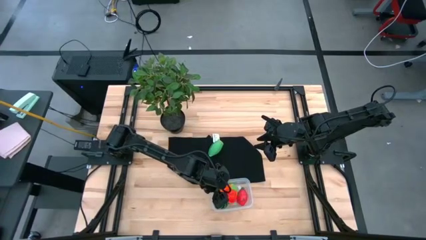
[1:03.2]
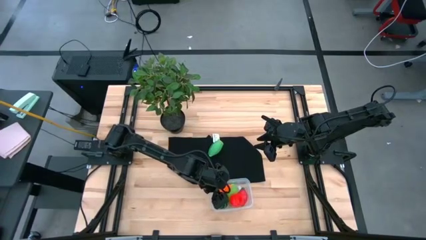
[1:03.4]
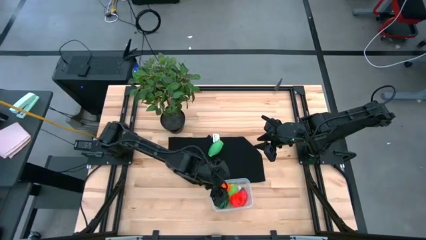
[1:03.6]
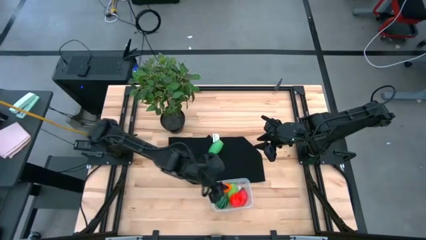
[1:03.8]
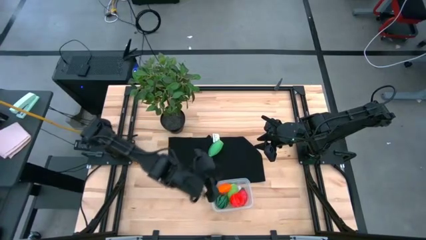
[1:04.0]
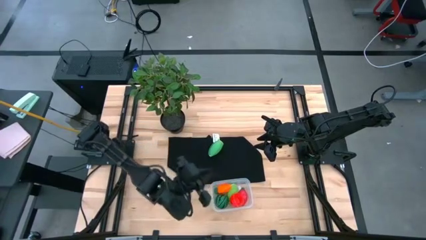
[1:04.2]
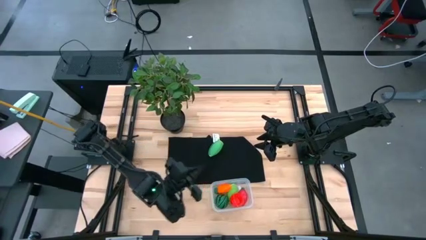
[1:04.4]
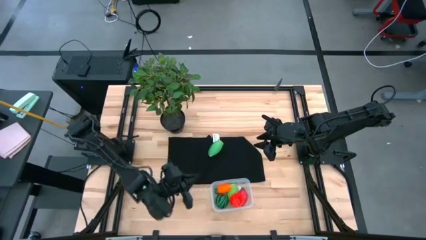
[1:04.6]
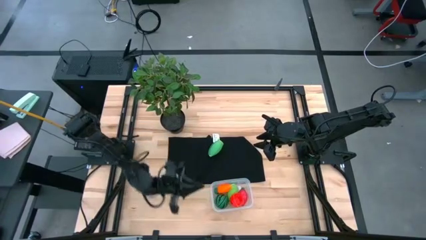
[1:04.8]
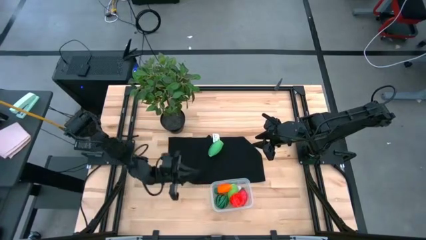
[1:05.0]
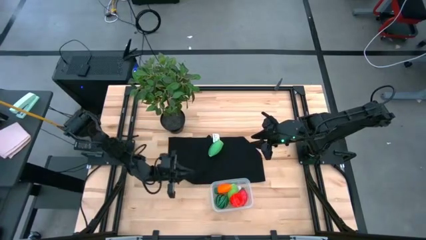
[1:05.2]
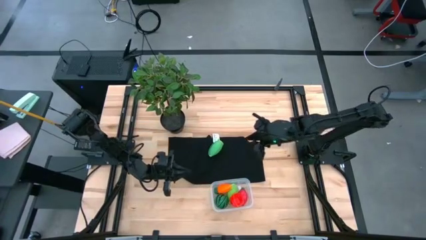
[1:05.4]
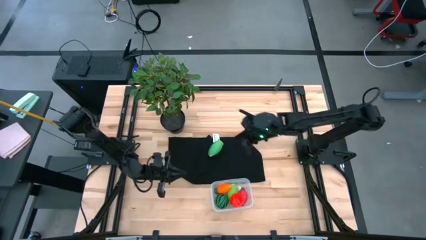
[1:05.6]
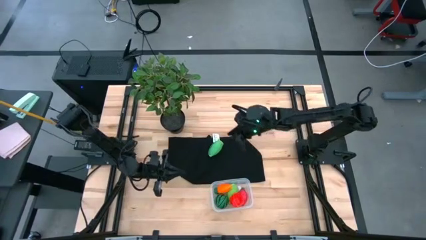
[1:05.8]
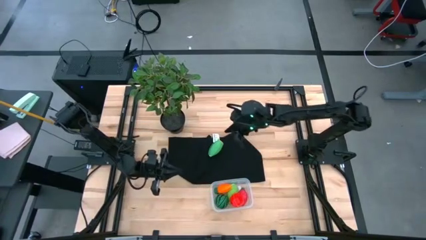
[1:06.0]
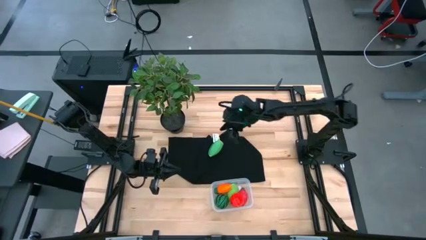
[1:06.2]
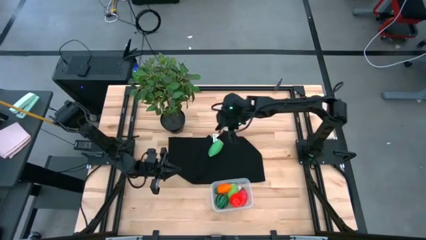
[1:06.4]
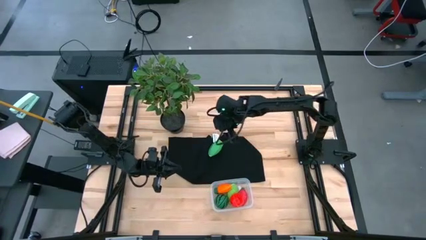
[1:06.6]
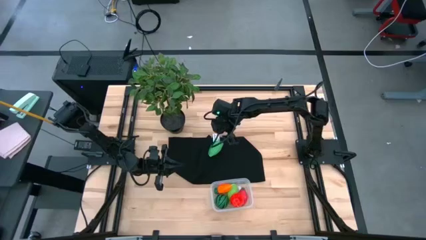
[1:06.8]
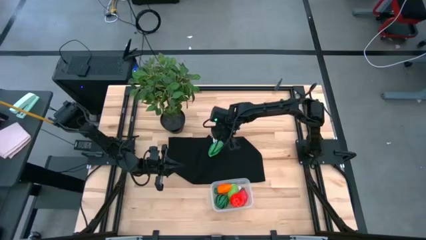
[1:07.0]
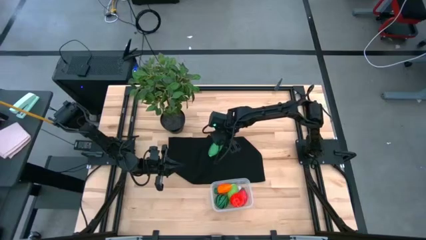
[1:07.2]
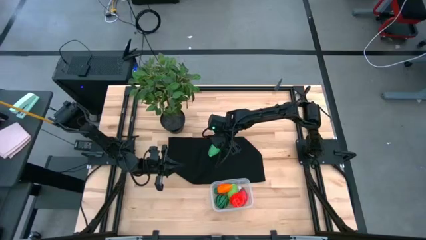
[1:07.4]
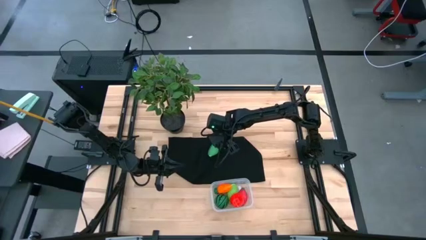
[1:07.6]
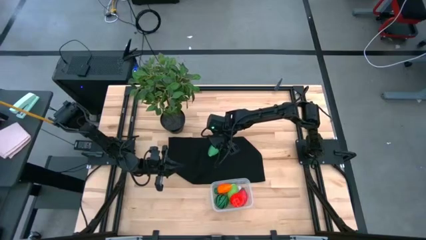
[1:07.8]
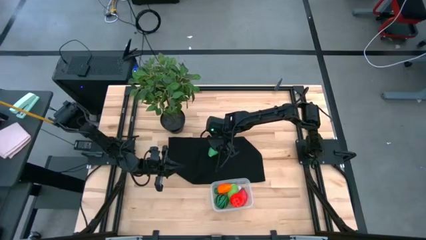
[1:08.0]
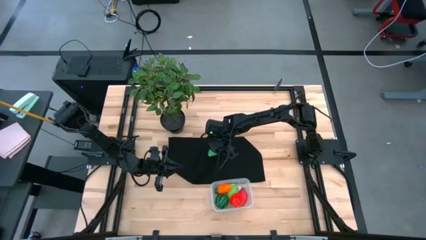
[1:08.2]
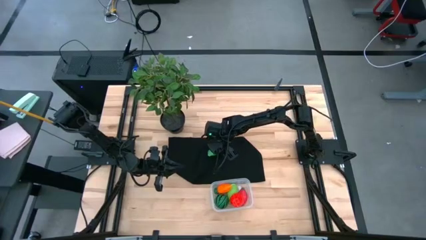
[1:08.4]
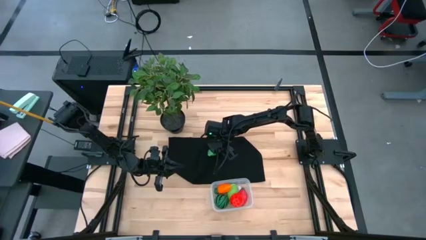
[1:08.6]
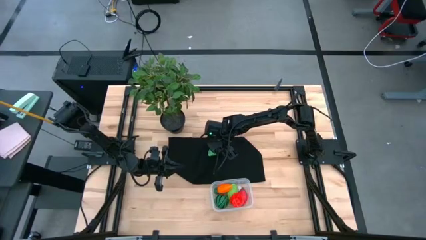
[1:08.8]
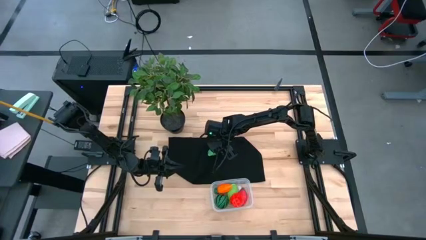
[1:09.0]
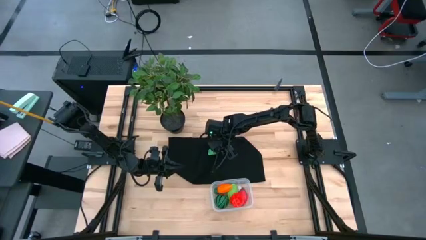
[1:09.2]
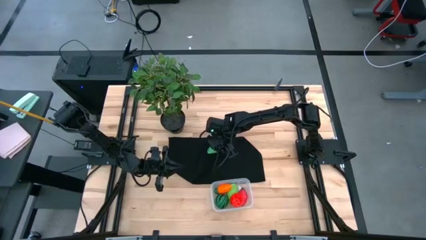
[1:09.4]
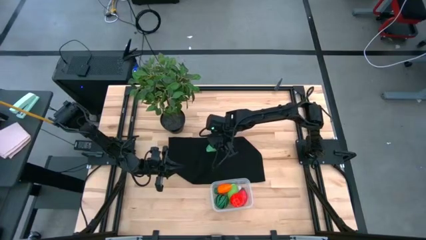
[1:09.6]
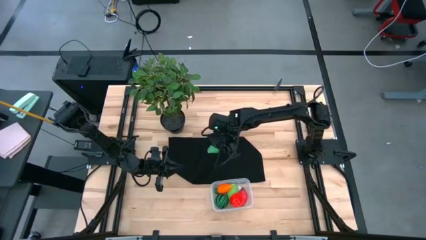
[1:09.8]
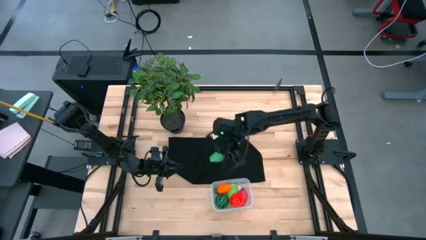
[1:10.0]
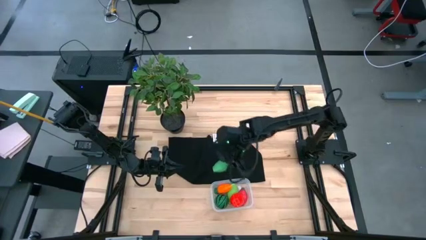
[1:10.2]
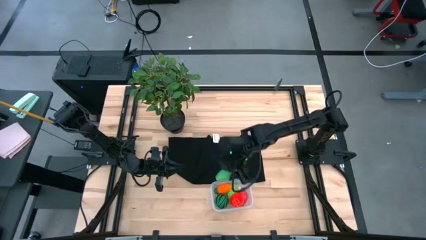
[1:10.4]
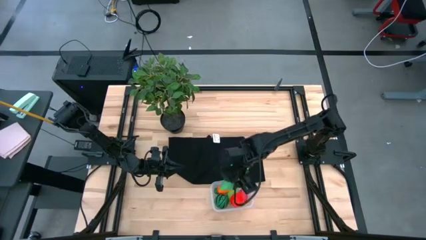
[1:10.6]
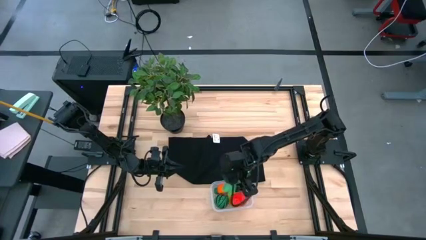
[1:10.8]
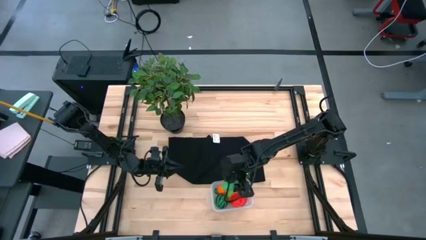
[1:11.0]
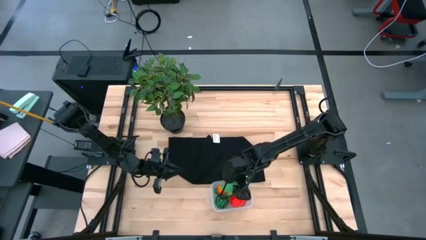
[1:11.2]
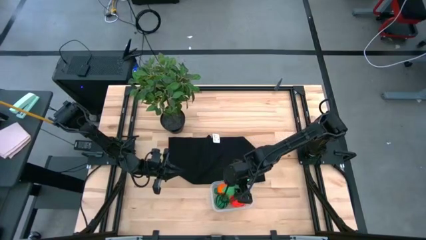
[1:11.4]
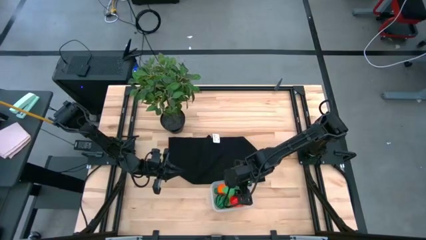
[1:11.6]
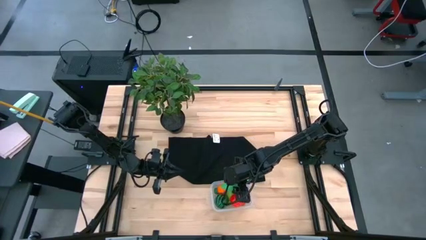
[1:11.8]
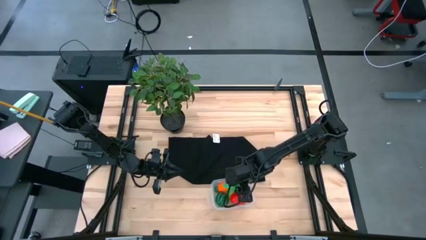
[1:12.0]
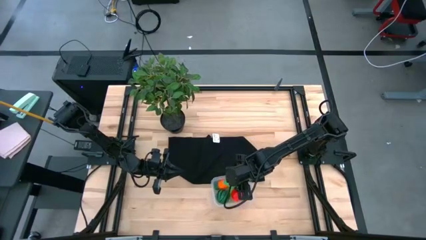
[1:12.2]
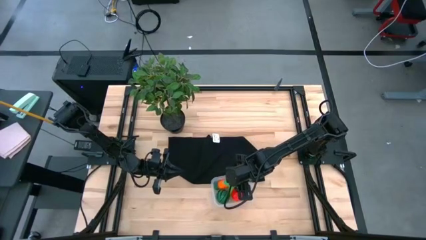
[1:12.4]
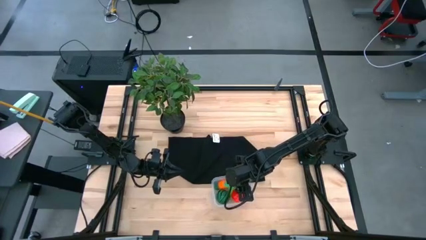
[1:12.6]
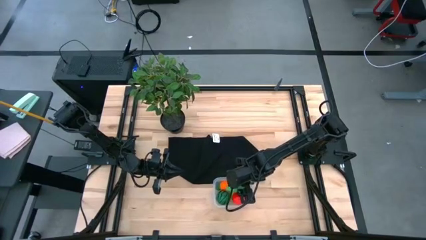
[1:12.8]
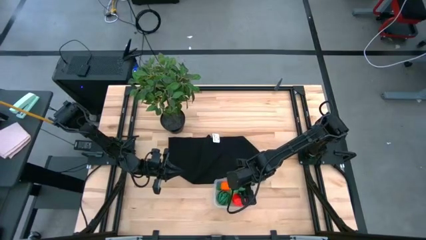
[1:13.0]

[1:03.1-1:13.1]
Task: Pick and placing Produce into tupperware
Put the green corn into the transparent bin

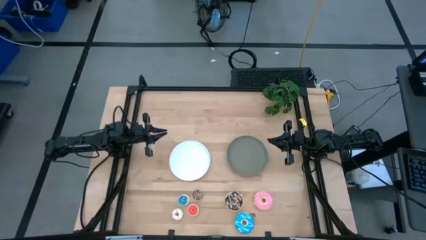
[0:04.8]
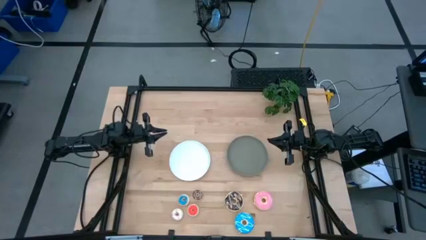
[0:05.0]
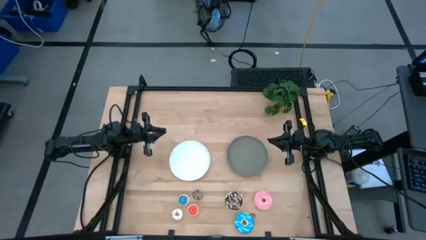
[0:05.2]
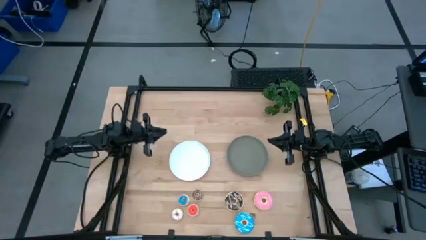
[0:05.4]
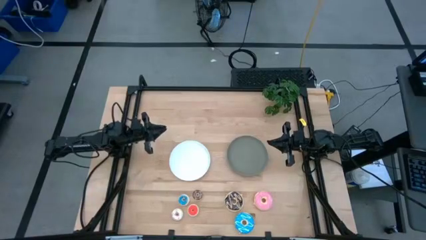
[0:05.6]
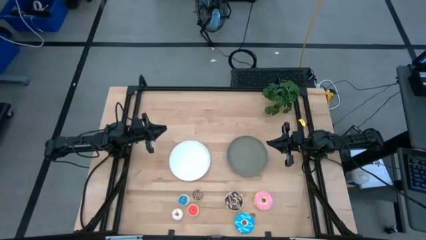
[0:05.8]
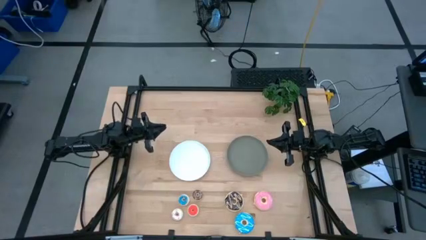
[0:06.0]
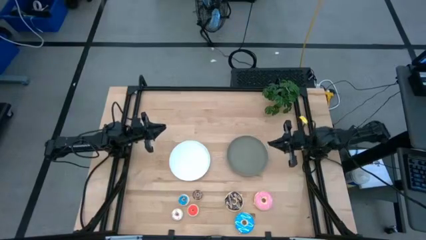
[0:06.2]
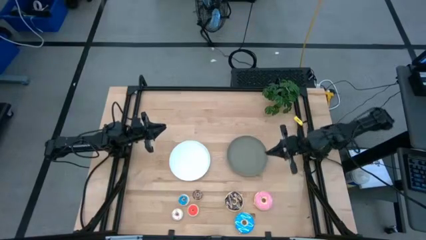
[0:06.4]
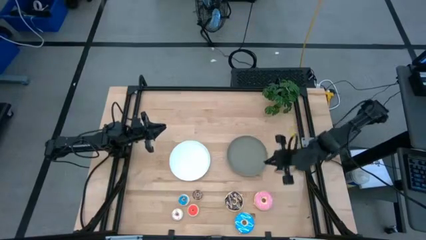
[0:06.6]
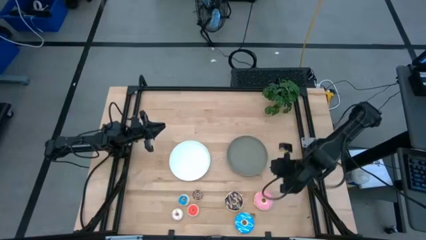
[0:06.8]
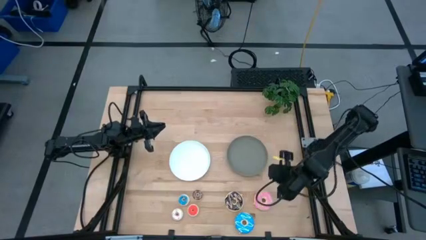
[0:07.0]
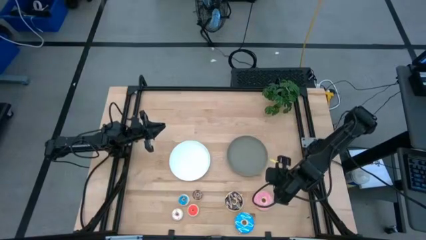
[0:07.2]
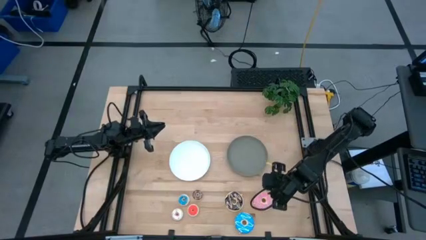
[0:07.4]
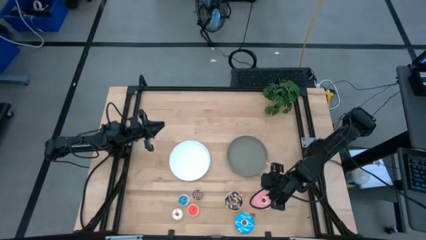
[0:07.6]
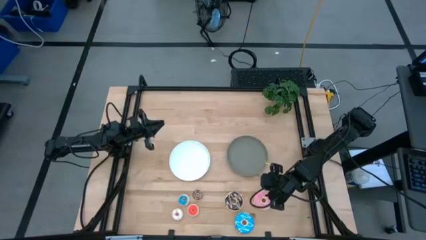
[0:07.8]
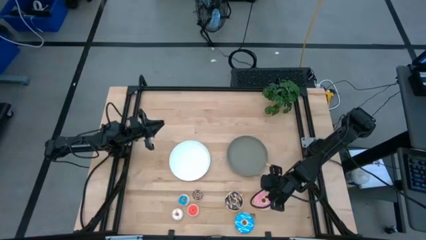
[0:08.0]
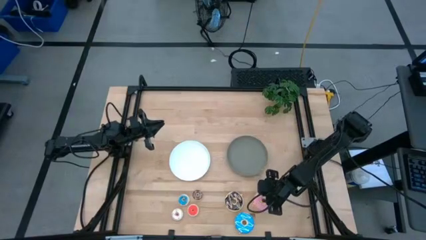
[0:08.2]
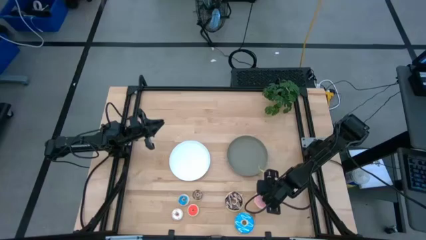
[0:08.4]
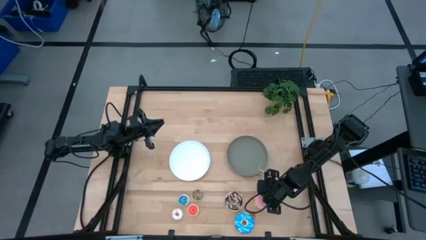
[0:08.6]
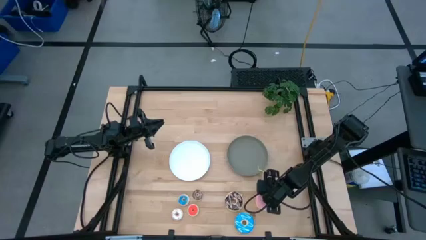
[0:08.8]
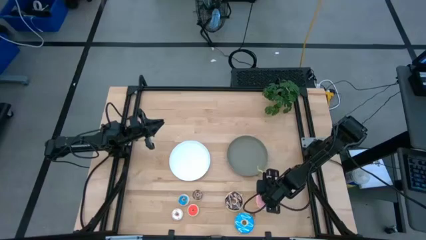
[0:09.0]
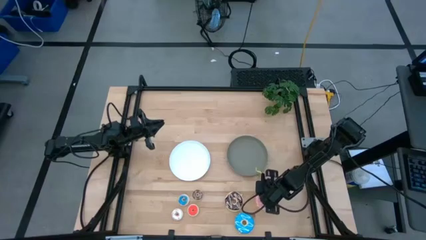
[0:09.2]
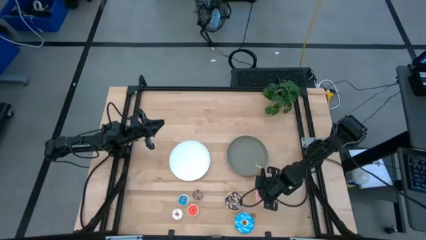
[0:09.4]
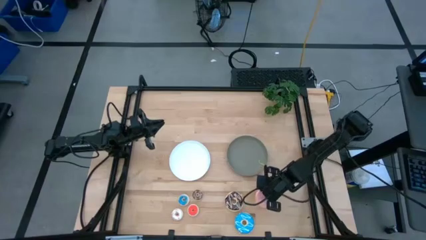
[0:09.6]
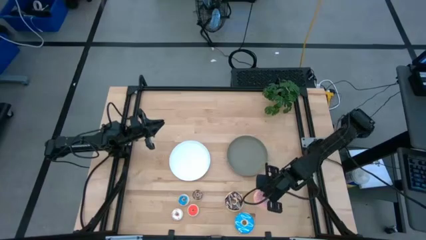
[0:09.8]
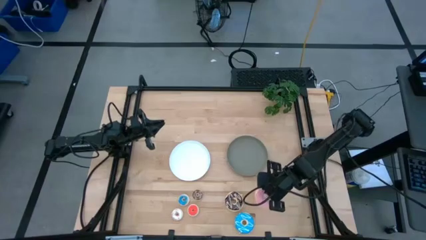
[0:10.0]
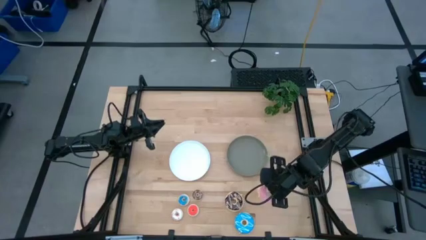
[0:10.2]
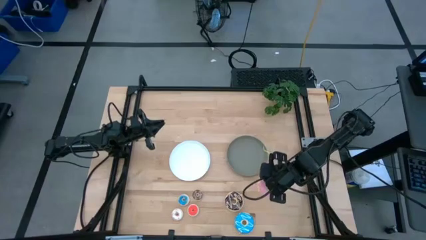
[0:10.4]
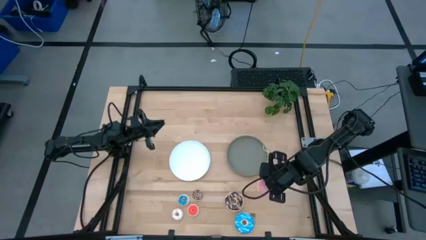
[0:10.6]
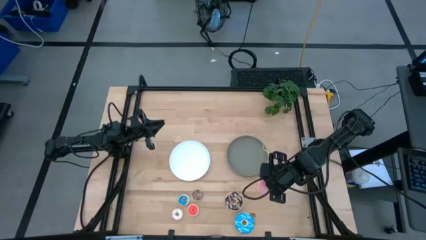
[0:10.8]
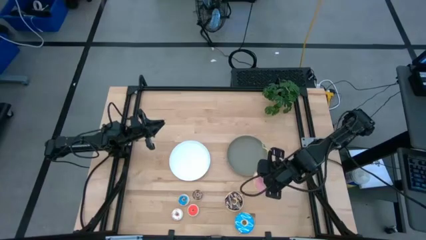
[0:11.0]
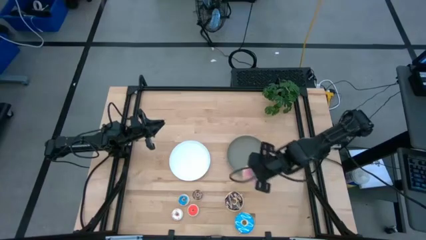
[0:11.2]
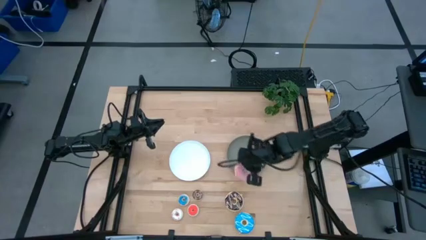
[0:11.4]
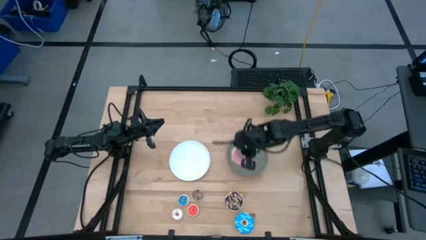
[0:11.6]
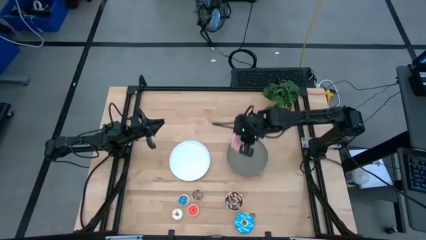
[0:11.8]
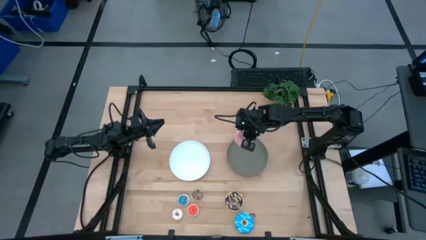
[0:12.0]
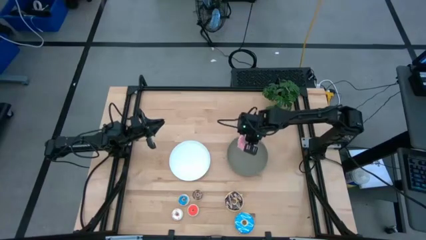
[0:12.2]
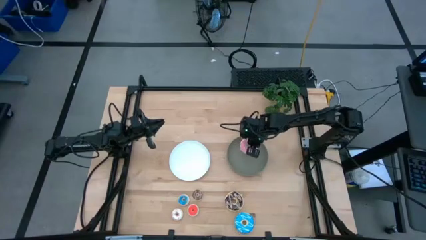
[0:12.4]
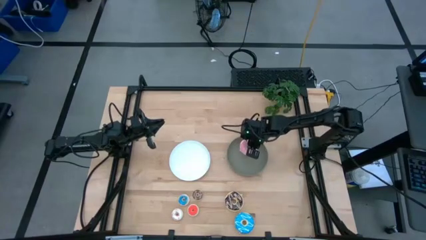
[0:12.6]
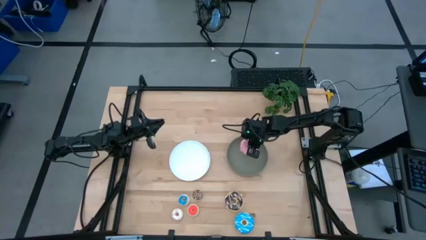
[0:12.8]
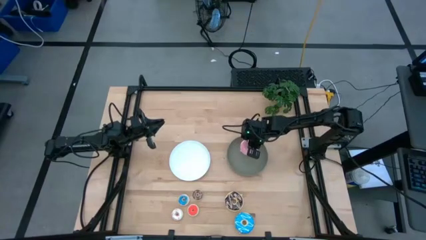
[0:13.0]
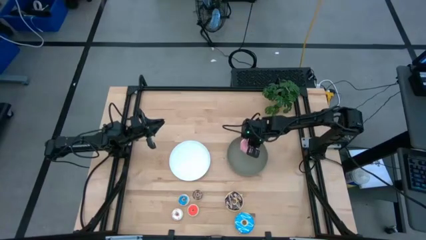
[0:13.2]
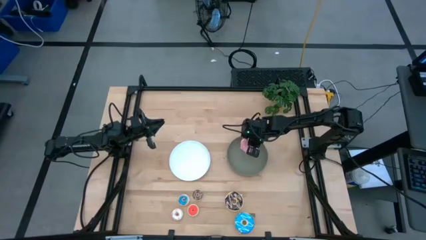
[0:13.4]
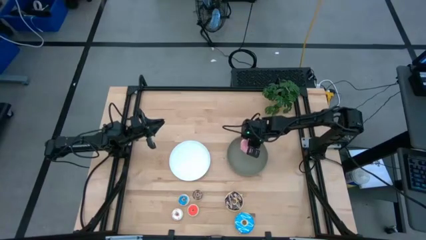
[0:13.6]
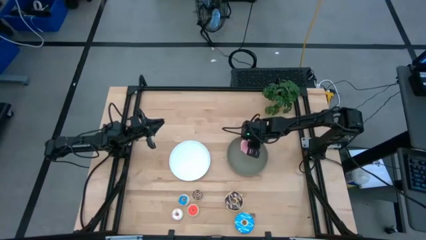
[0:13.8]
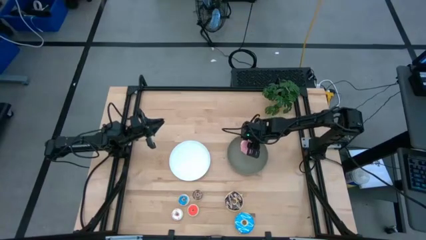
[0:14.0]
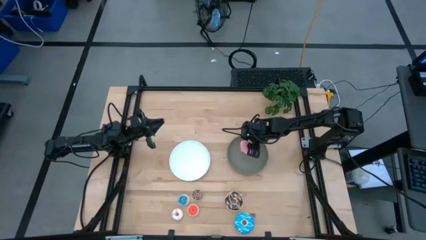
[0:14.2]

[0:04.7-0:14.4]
Task: Pick & Place donuts
Put the large pink donut on the gray plate
